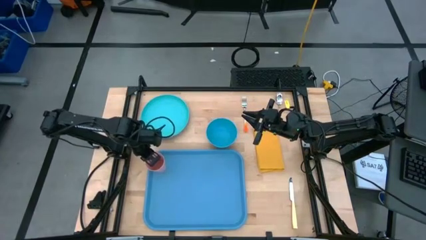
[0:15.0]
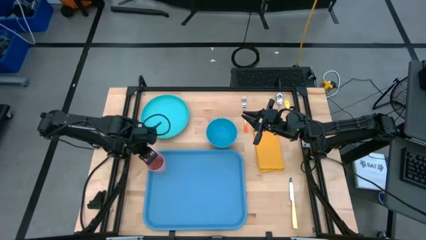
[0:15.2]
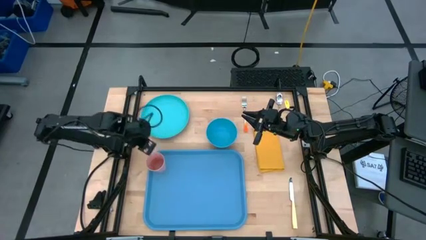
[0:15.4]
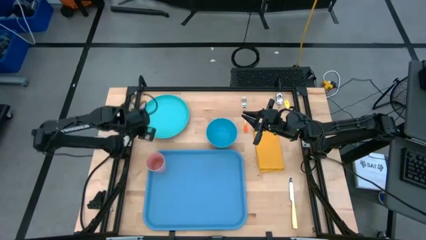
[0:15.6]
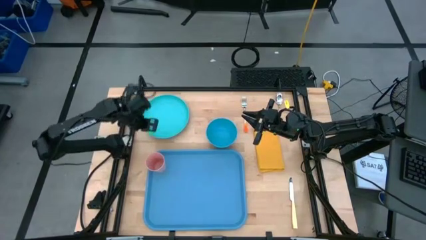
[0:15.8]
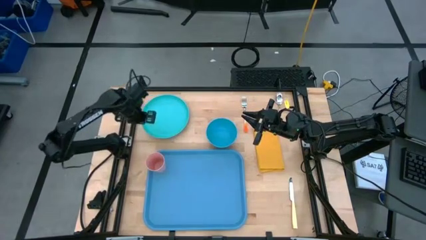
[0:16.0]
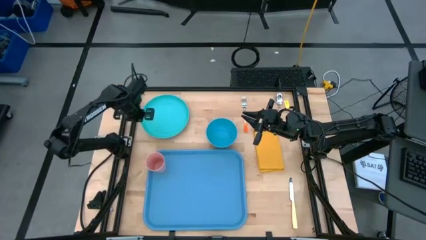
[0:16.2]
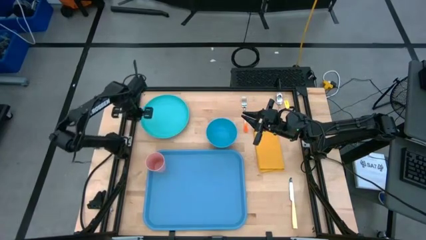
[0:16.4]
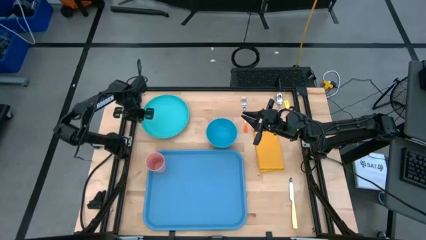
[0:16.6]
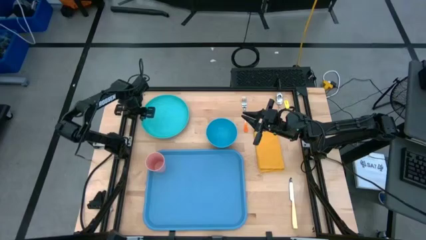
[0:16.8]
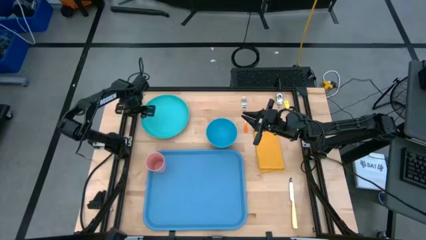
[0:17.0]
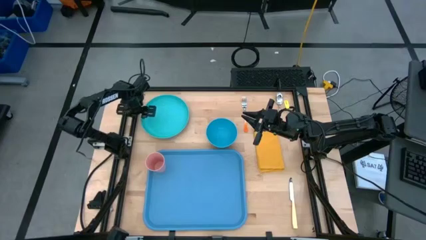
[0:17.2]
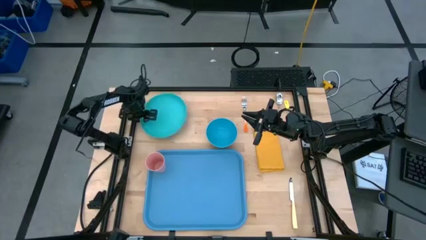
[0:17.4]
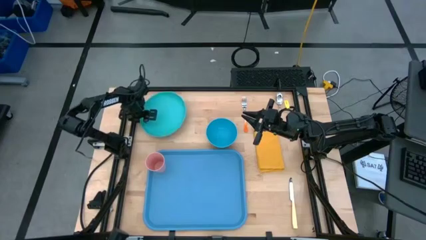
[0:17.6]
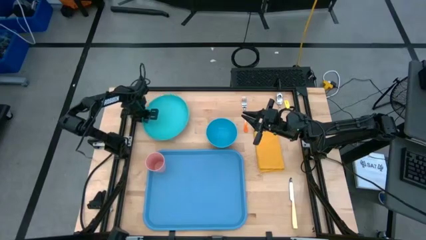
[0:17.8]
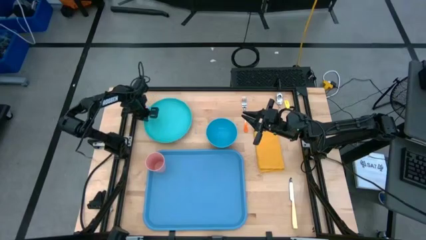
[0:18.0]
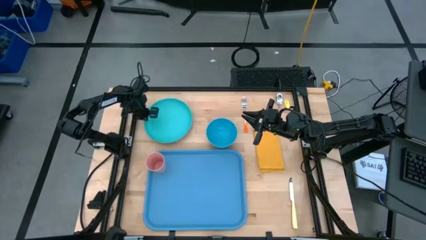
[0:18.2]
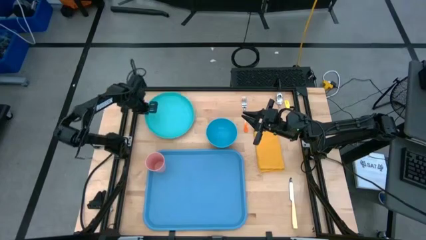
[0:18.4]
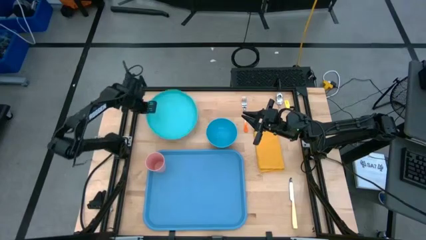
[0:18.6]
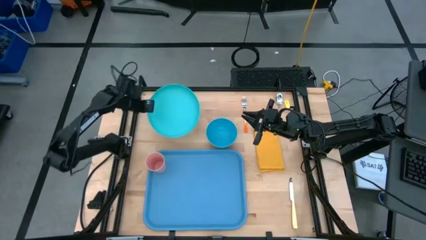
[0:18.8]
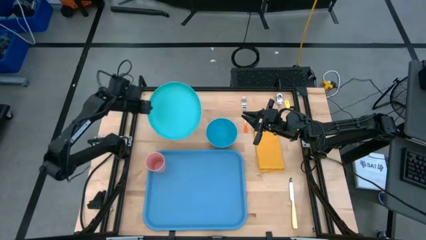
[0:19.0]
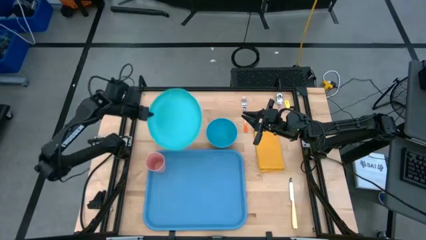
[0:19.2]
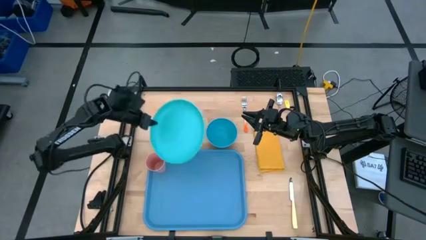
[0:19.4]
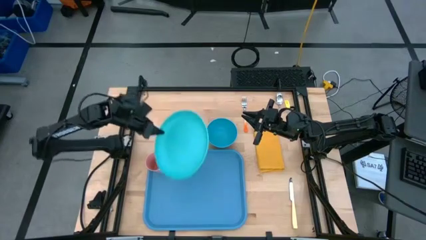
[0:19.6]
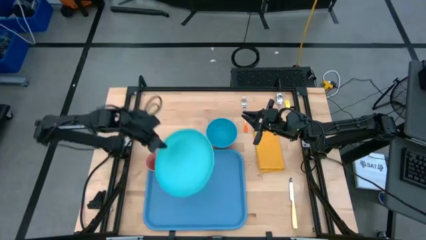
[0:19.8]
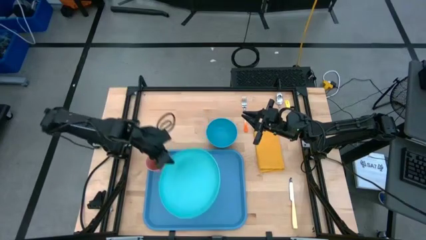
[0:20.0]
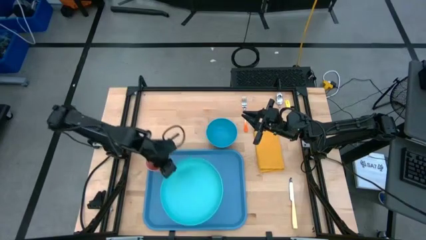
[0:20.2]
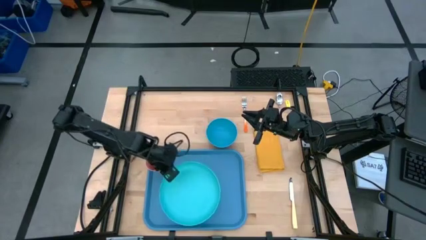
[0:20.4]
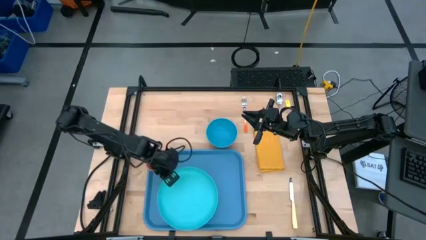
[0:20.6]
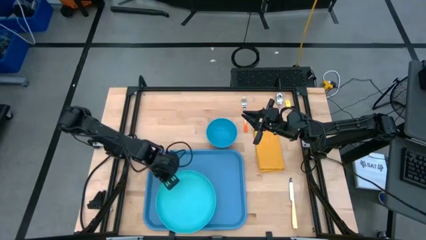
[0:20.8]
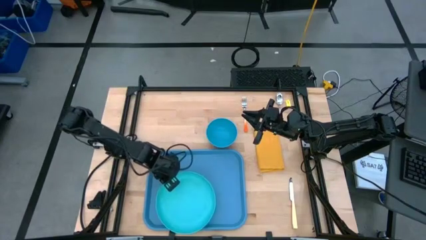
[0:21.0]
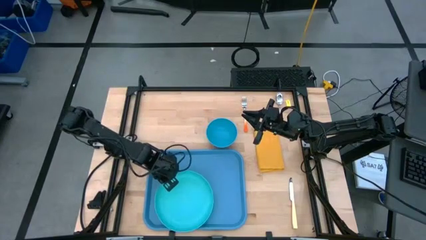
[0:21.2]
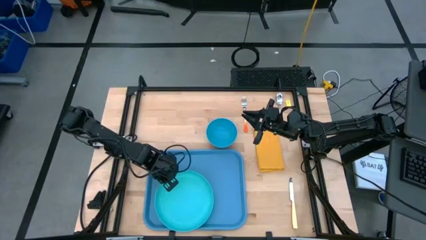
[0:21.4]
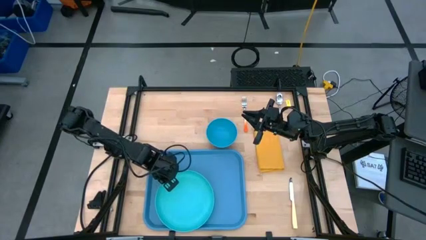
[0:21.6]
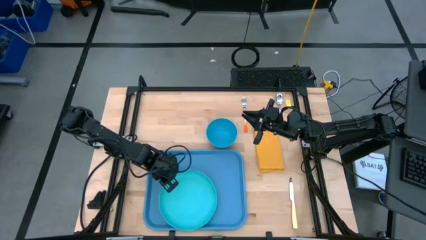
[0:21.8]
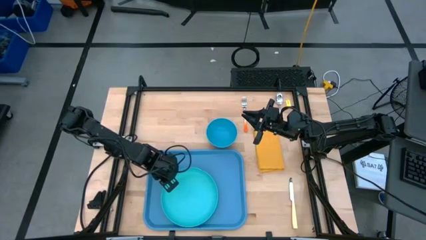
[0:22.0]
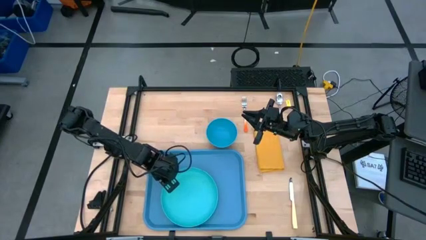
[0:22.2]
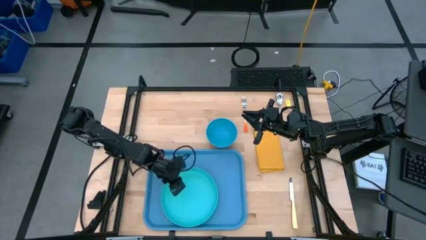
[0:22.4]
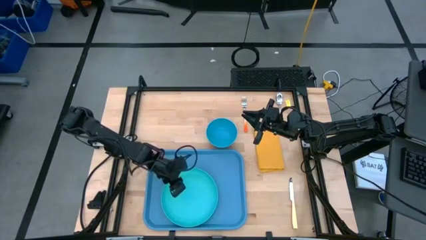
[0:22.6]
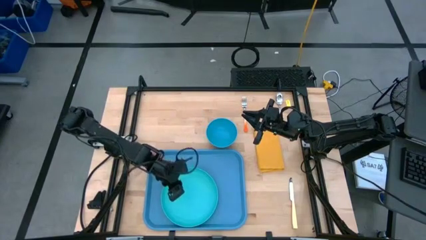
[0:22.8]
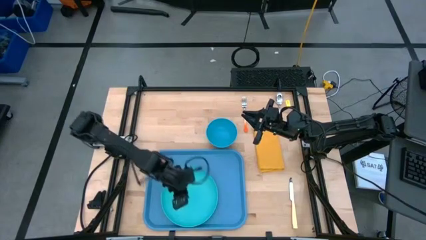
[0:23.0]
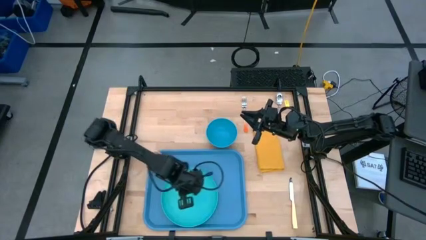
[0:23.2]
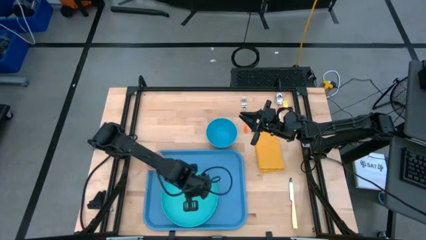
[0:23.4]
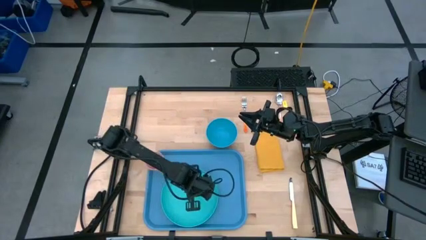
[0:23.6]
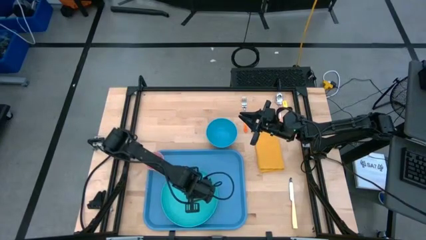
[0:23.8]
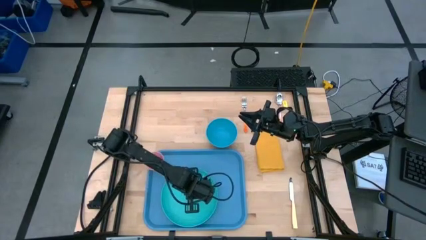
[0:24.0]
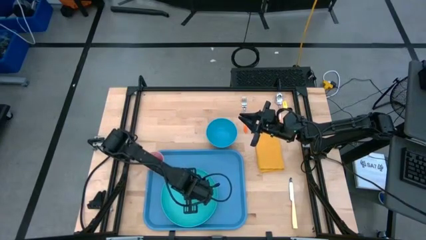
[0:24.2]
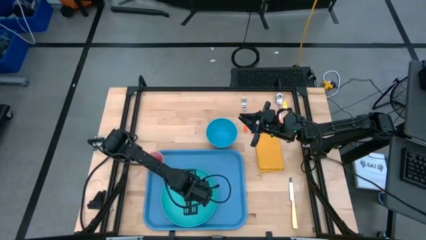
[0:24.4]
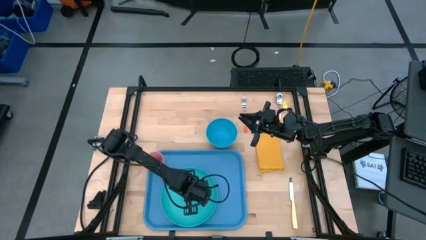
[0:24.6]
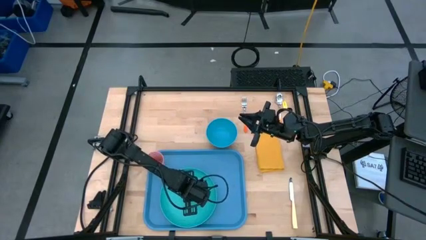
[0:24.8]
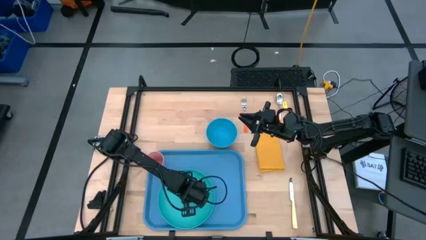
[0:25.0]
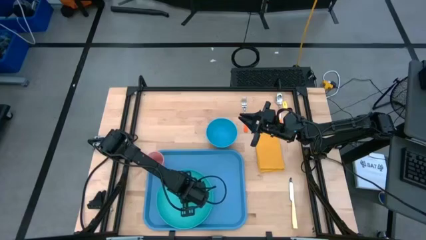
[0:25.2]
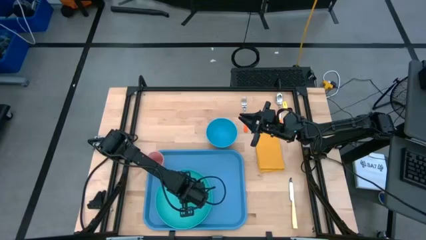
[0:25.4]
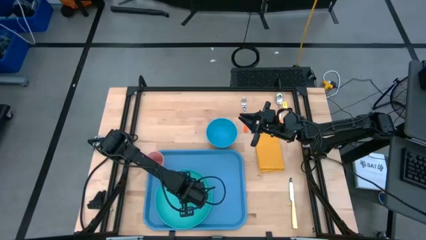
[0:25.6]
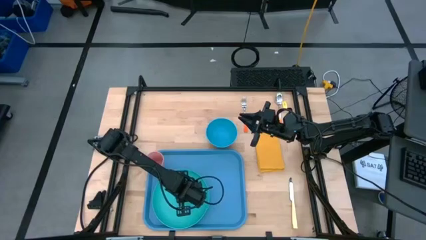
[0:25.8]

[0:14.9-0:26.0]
Task: Set up tray
Put the green plate on the blue tray

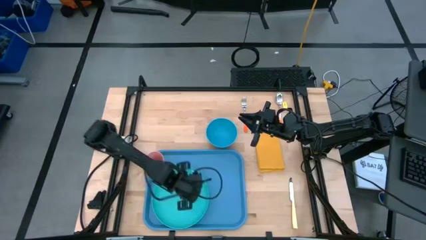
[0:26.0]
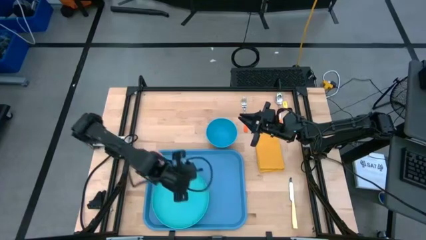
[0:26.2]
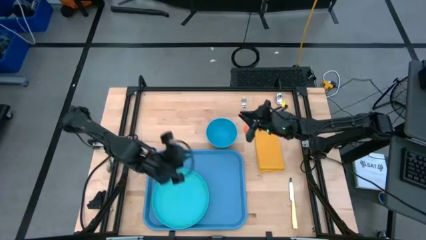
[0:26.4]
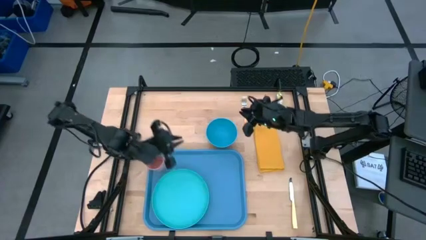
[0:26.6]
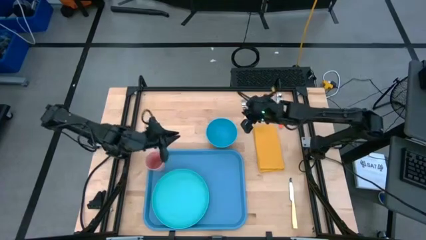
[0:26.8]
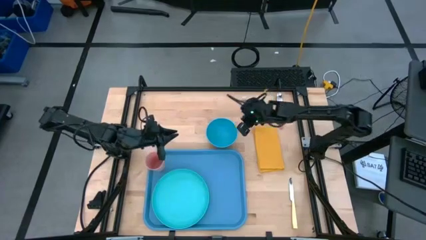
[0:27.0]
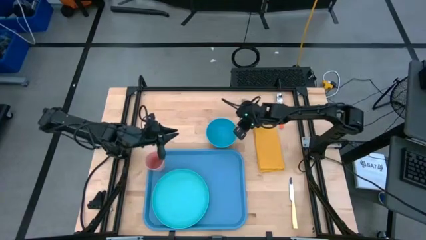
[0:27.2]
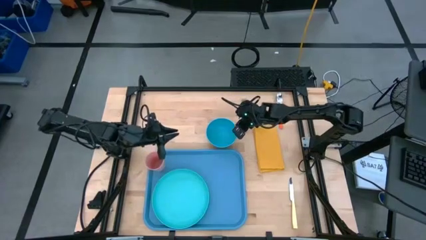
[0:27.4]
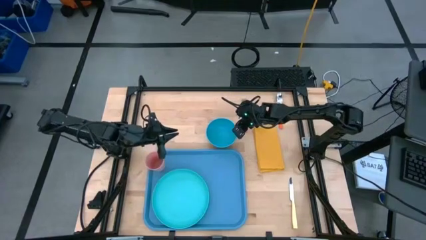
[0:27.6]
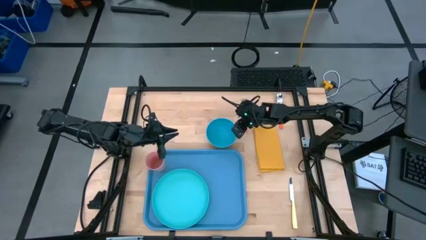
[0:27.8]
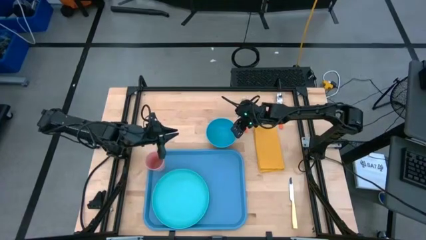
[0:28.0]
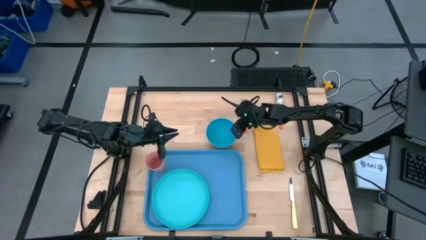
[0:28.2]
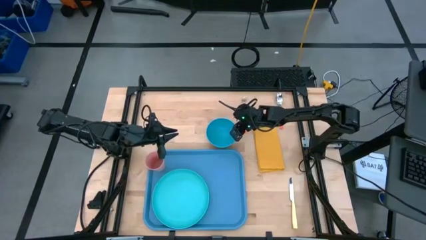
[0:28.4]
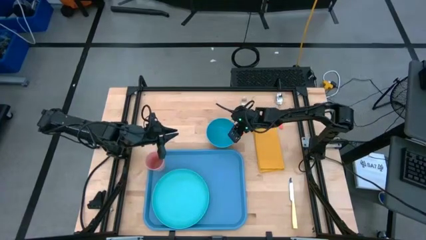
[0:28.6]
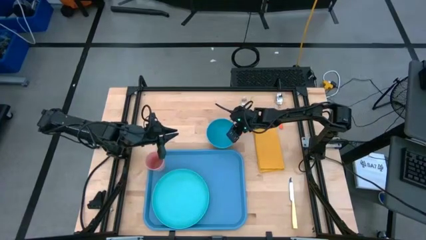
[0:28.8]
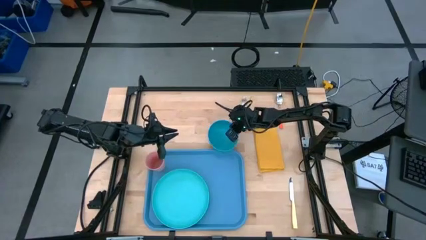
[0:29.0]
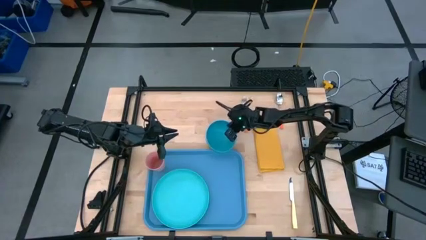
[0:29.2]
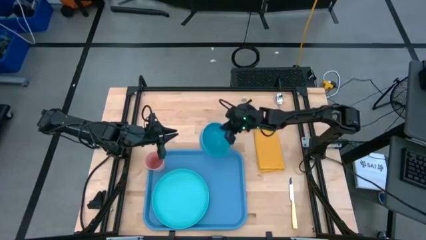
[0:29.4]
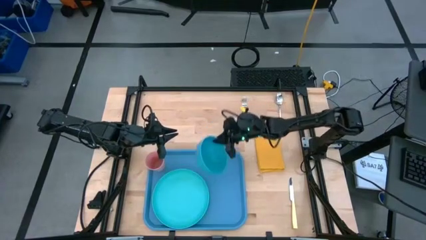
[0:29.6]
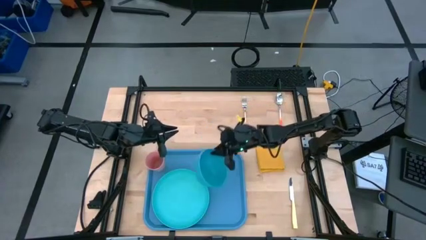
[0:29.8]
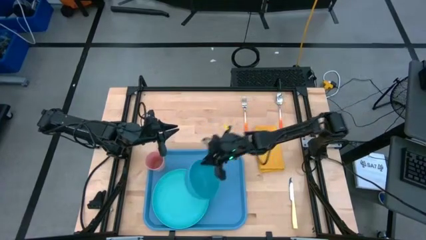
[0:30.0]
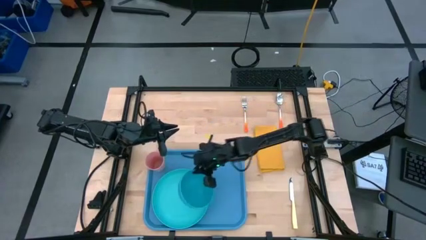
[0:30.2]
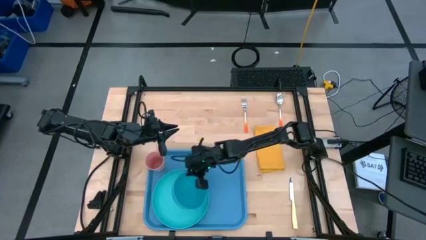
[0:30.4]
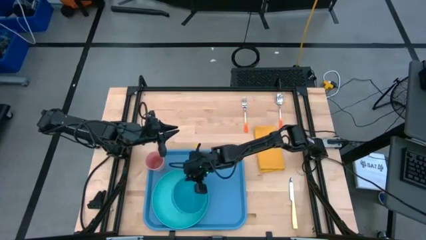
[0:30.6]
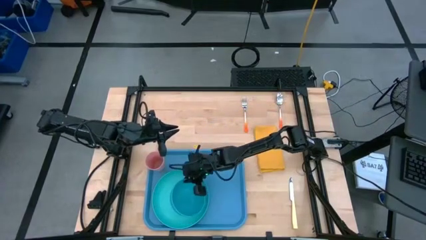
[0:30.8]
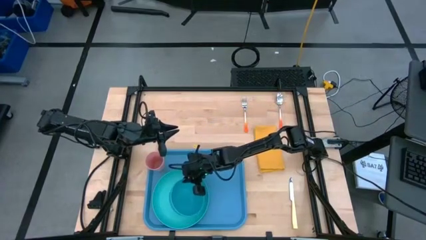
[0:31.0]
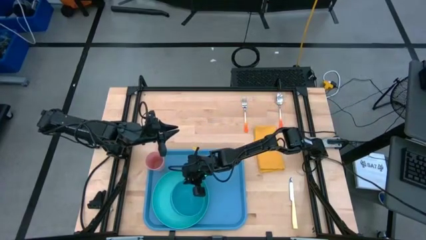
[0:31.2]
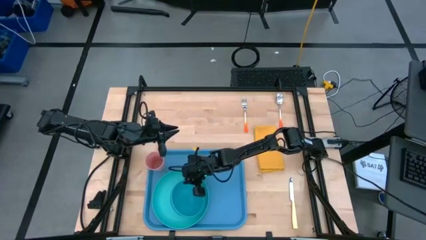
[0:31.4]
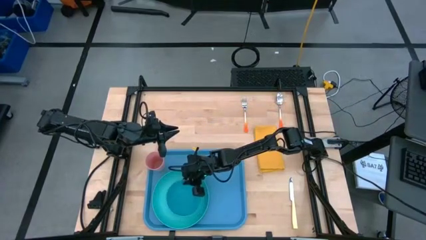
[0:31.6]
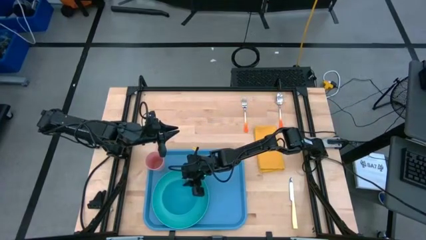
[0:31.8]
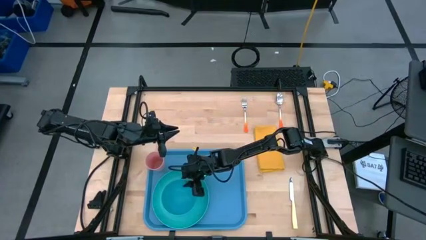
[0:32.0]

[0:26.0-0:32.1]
Put the blue bowl on the green plate
